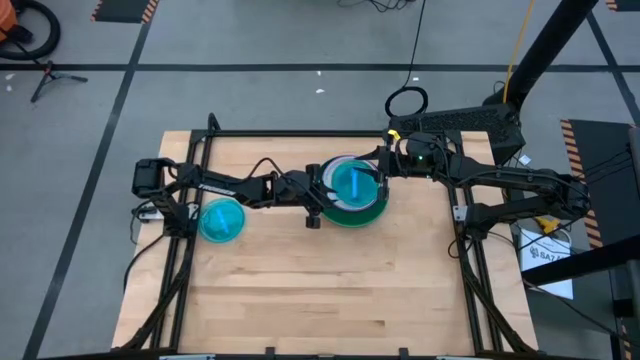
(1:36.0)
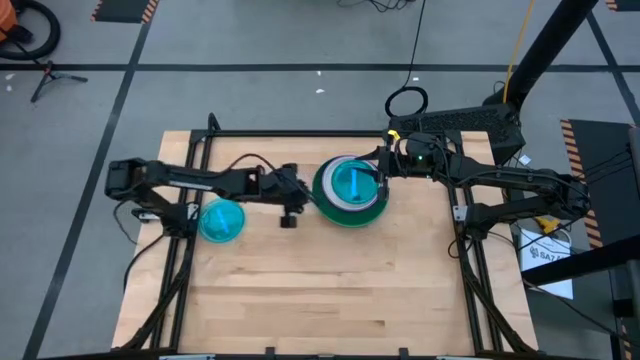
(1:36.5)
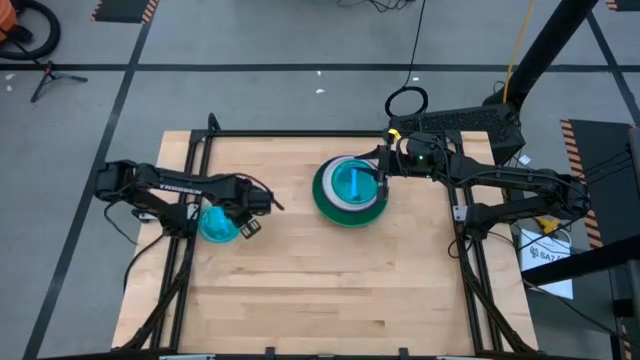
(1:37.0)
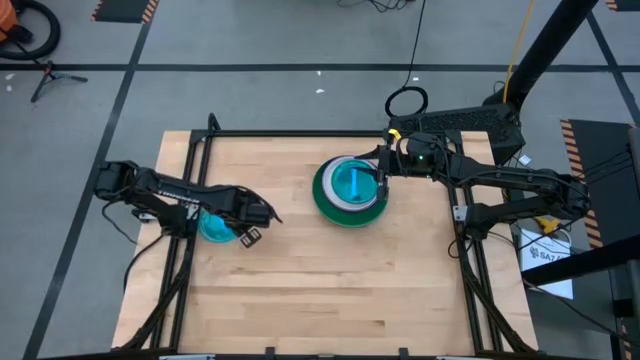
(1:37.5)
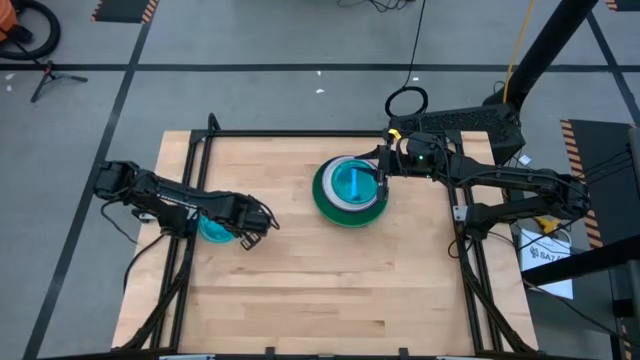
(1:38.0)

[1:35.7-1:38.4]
Task: Stack plastic plates
Stack the blue plate on the blue plate

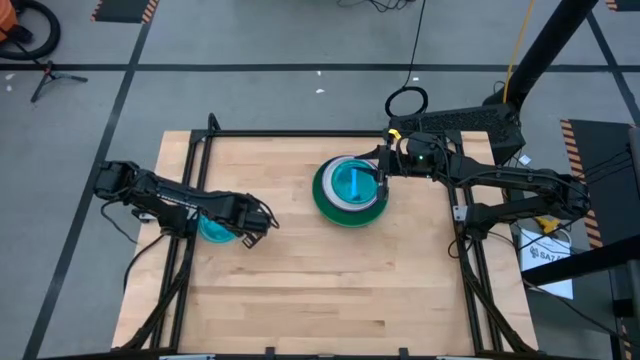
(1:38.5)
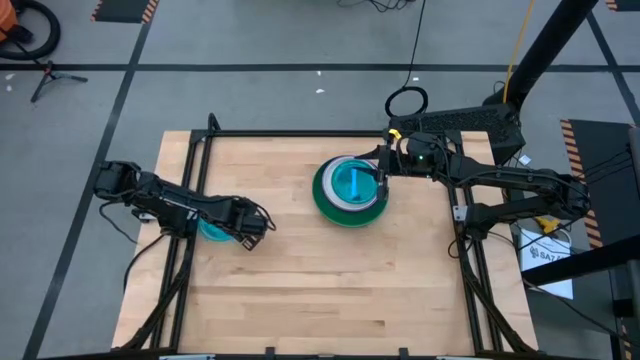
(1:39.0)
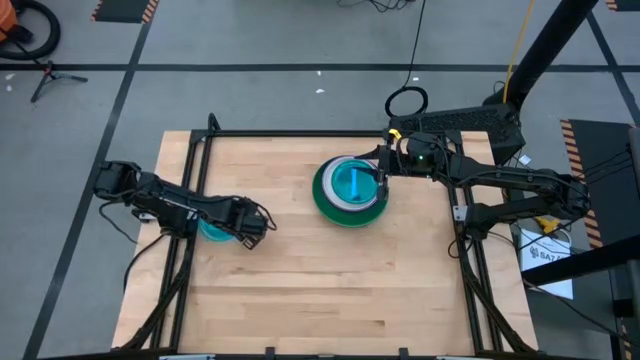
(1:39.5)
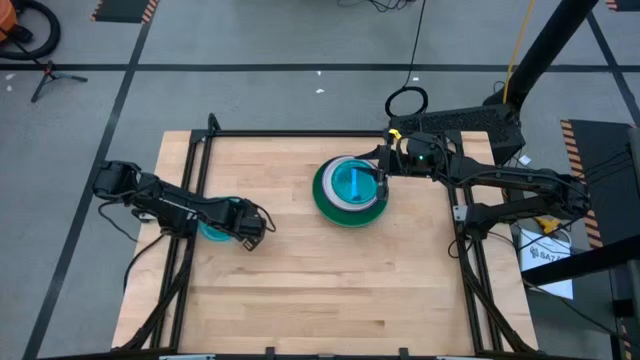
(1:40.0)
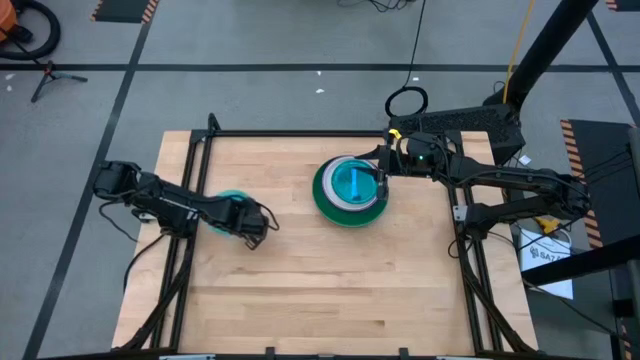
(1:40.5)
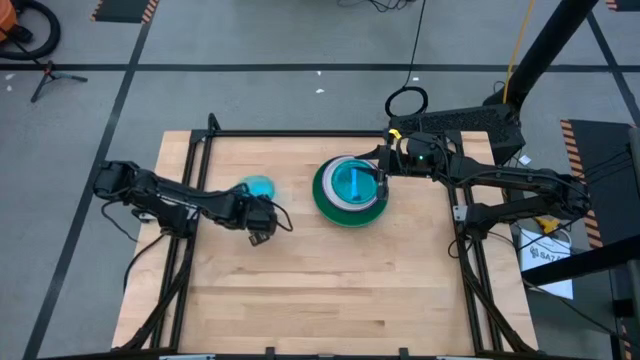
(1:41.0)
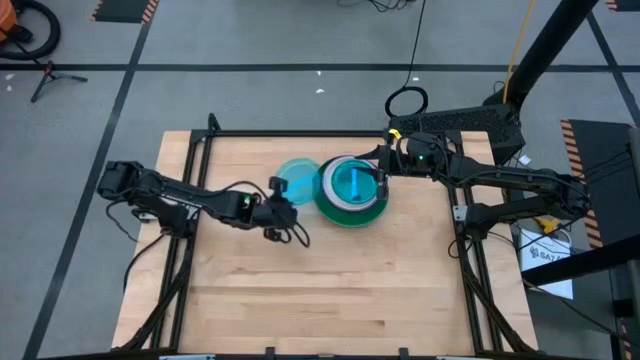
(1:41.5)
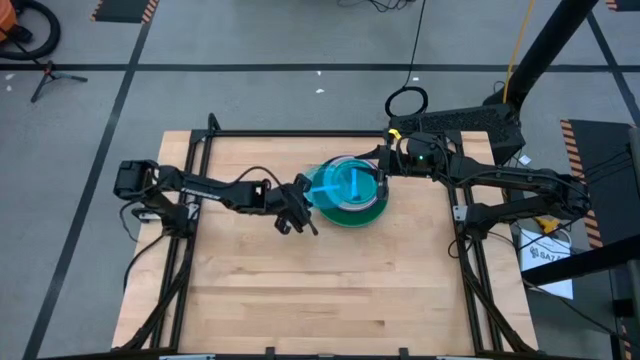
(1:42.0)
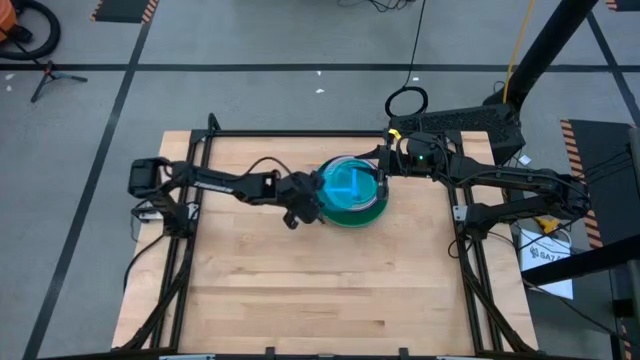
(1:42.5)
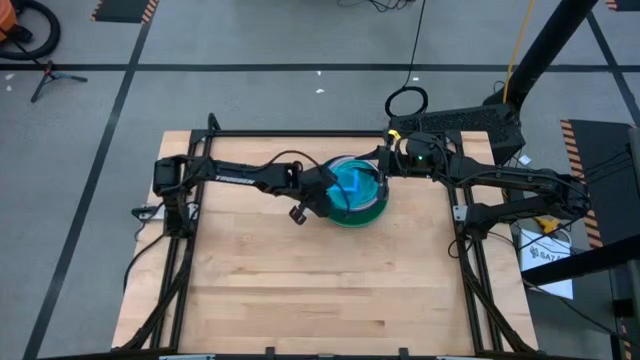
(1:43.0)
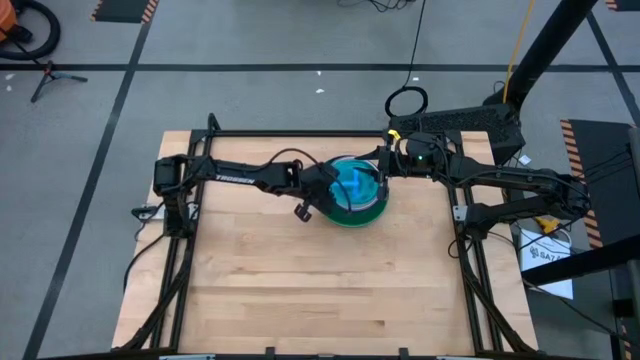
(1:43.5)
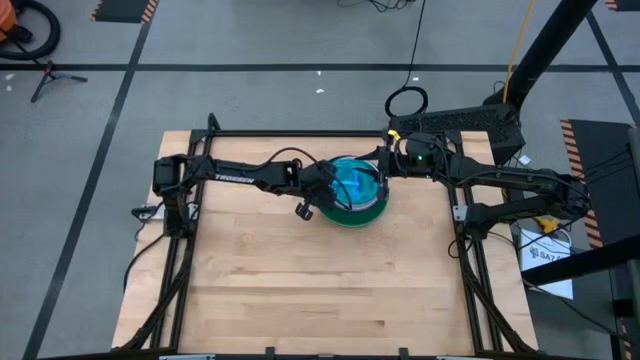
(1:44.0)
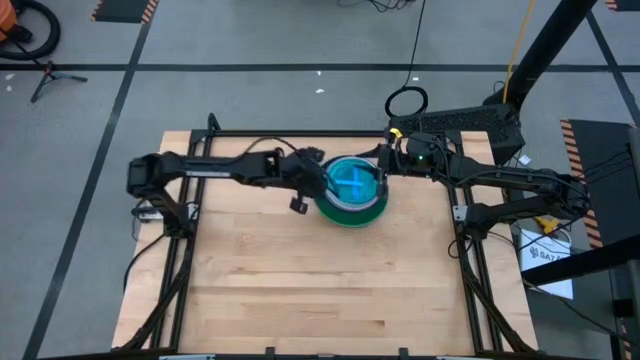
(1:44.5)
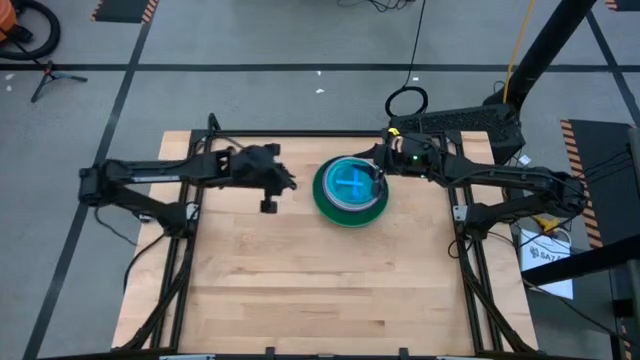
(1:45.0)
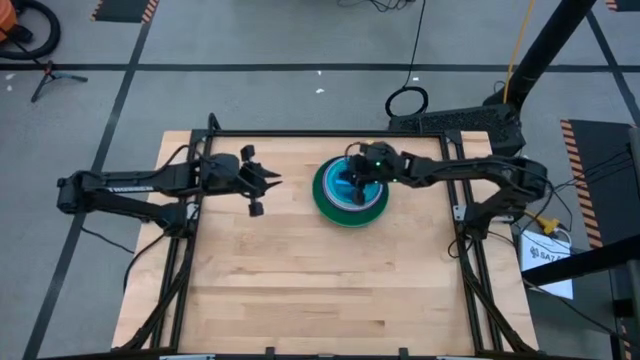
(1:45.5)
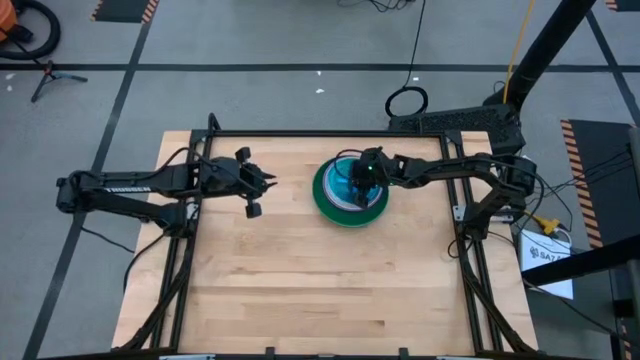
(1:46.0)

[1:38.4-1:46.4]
Stack the blue plate on the blue plate

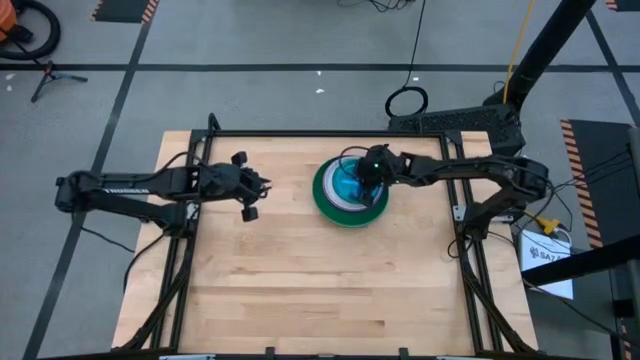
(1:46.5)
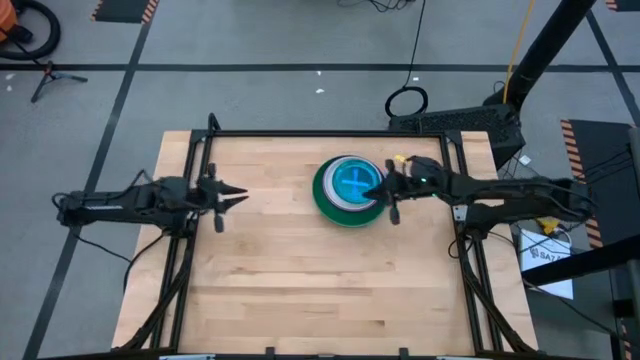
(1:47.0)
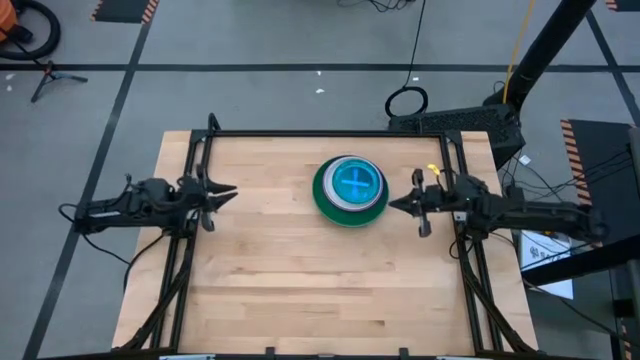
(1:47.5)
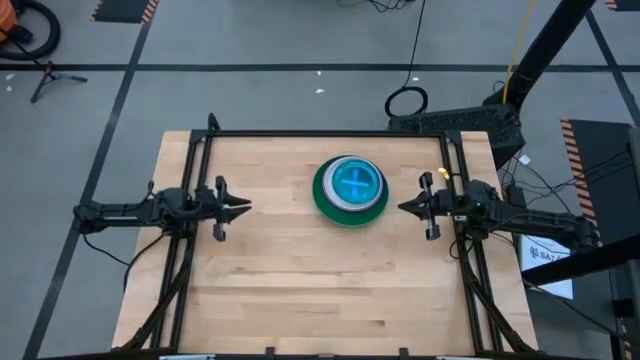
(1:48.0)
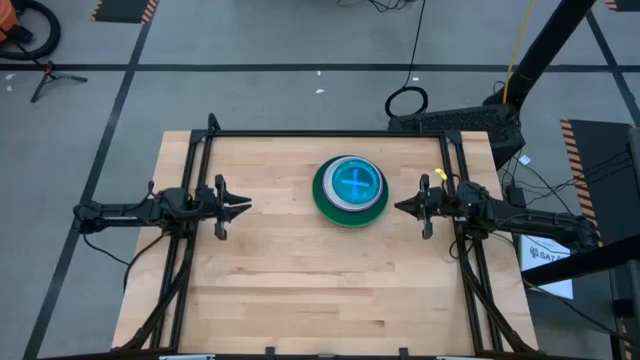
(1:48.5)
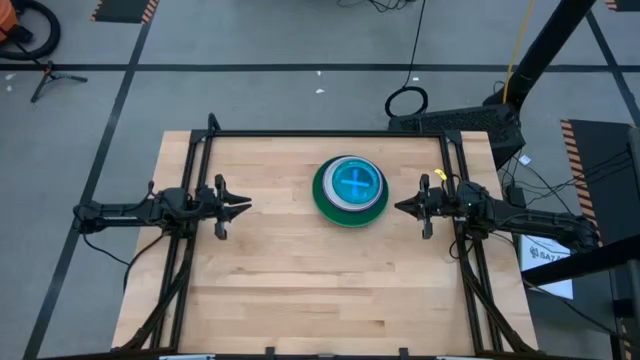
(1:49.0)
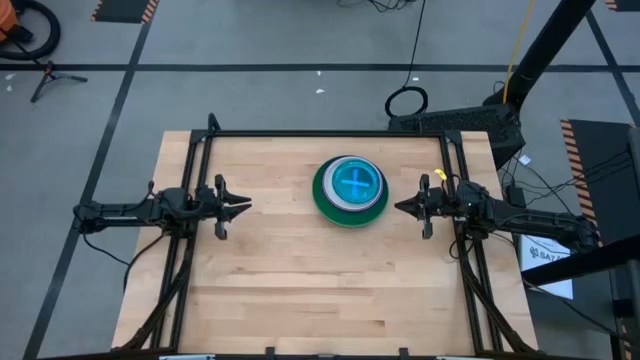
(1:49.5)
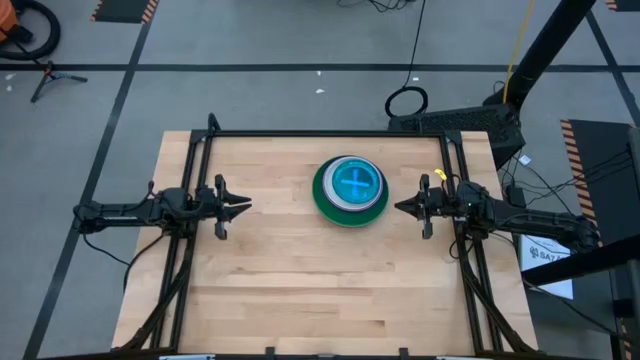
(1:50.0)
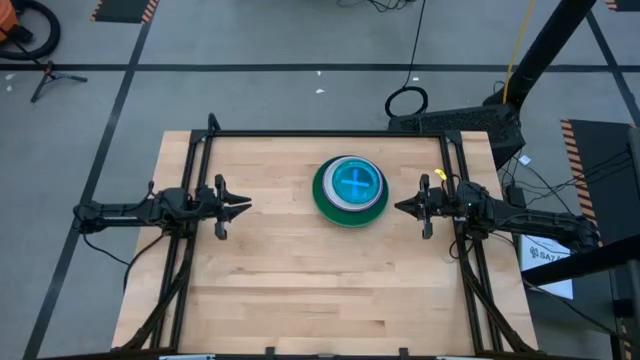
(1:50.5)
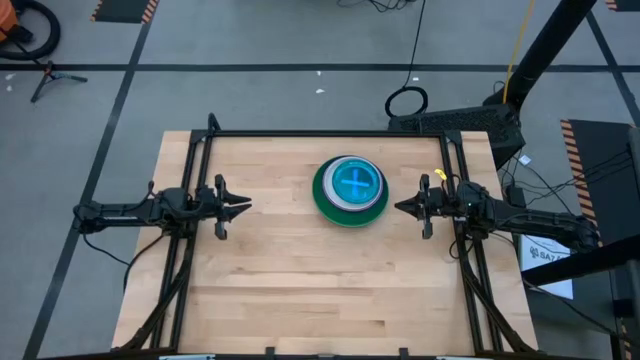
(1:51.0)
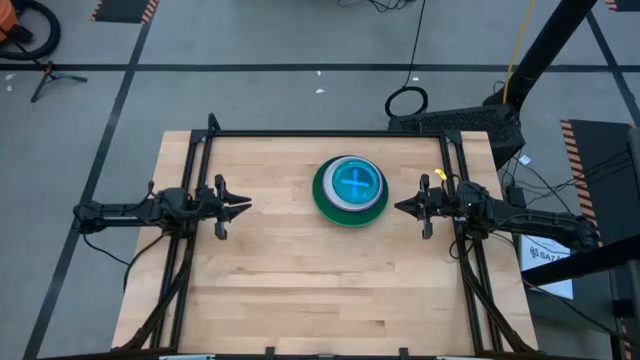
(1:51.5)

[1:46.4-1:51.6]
Return to Home Position

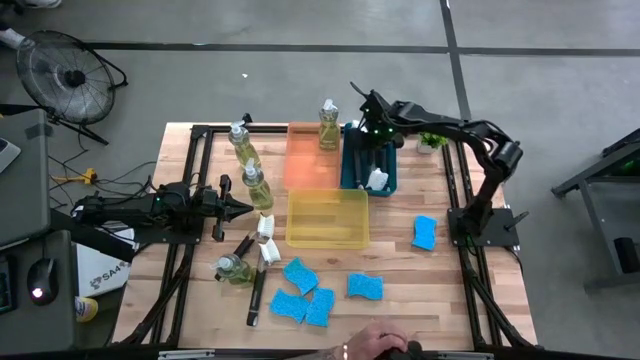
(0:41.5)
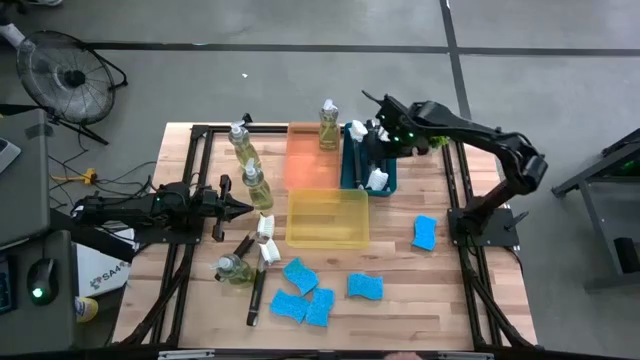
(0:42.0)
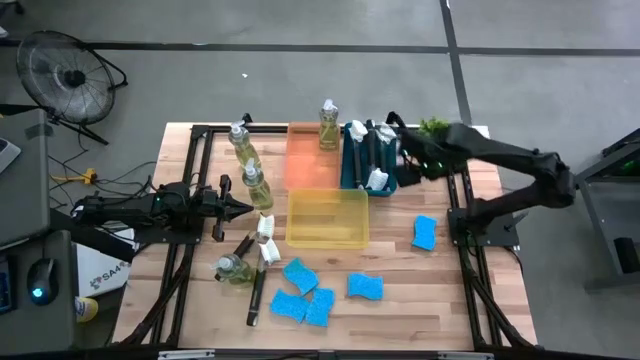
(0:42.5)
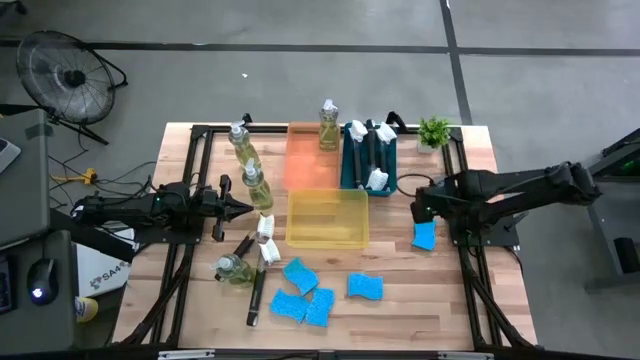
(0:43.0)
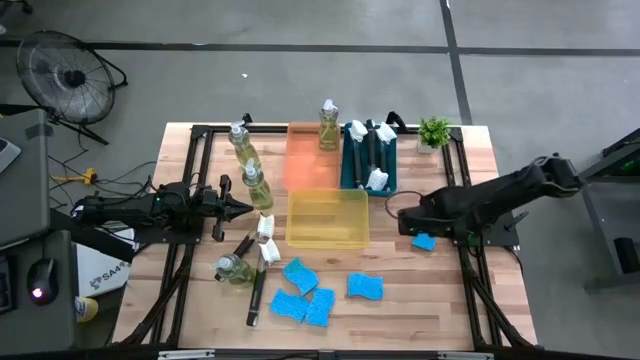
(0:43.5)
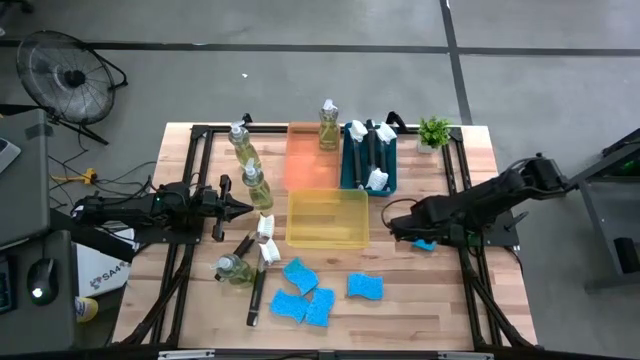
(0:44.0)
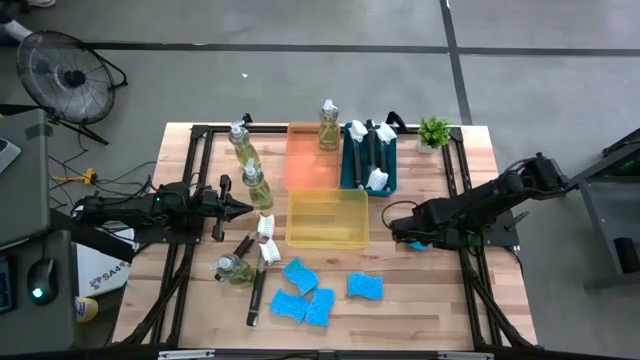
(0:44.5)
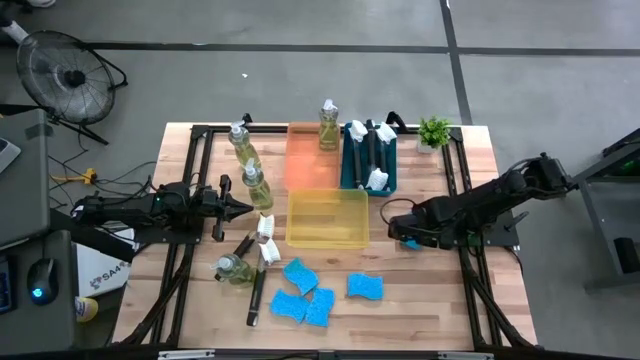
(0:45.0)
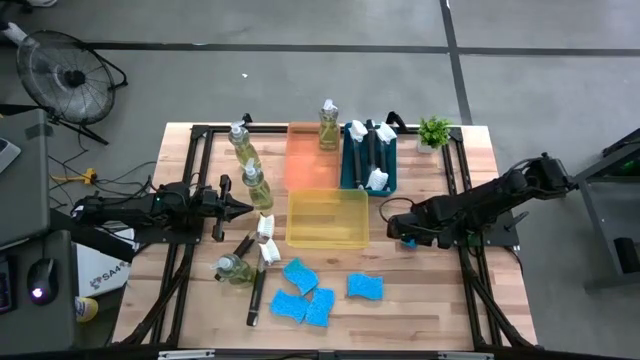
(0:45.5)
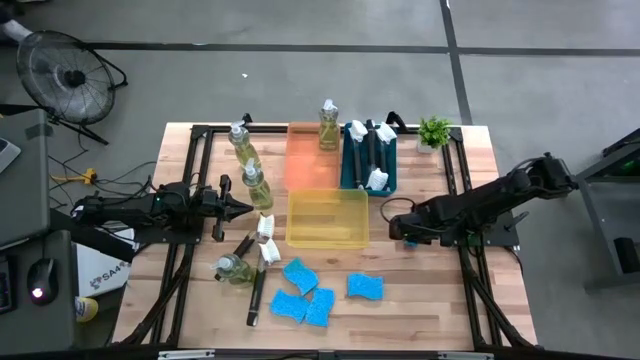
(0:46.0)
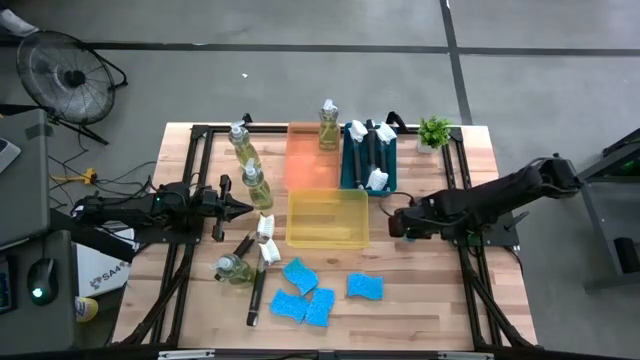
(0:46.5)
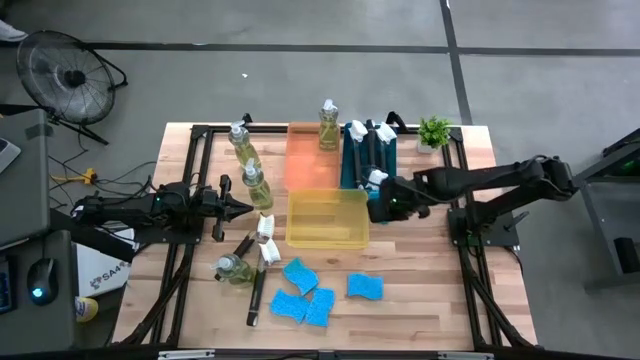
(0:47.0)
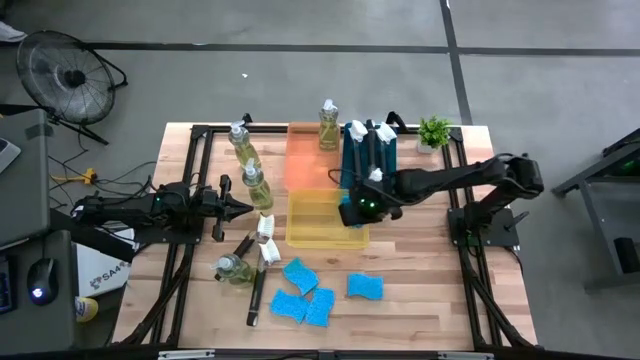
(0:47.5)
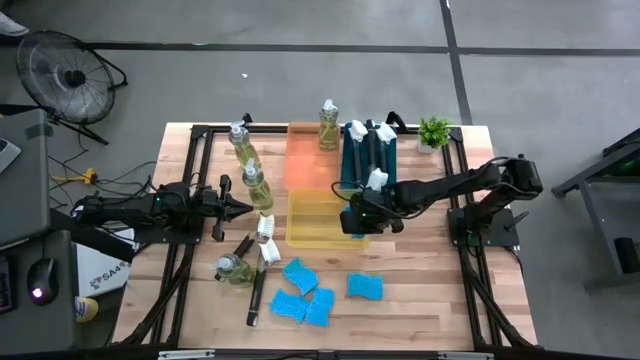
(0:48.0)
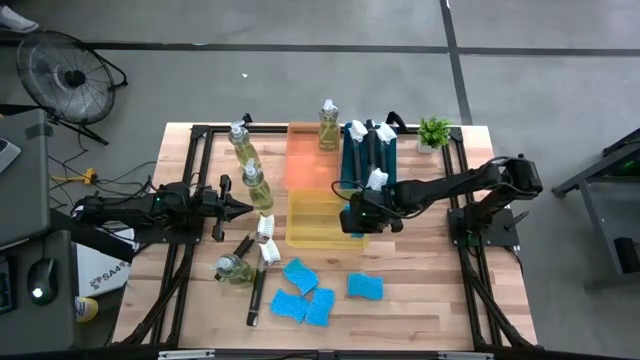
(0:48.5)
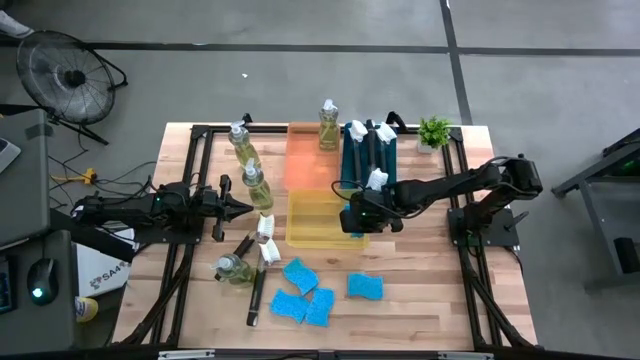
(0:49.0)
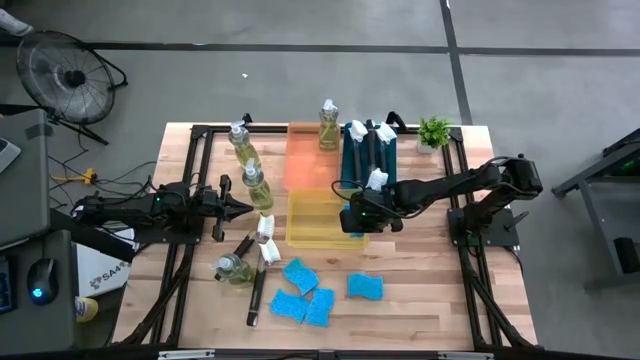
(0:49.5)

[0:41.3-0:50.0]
Task: Pick & Place Kitchen Sink Supplies
Put the sponge into the yellow bin
